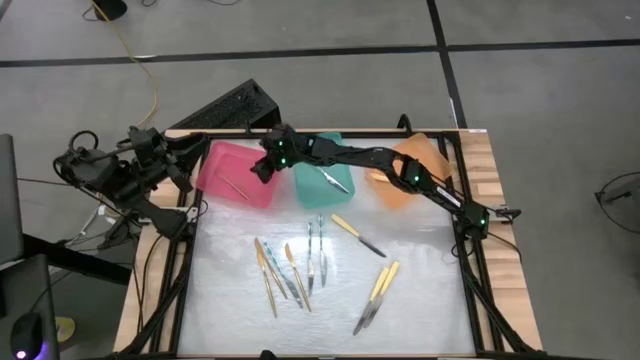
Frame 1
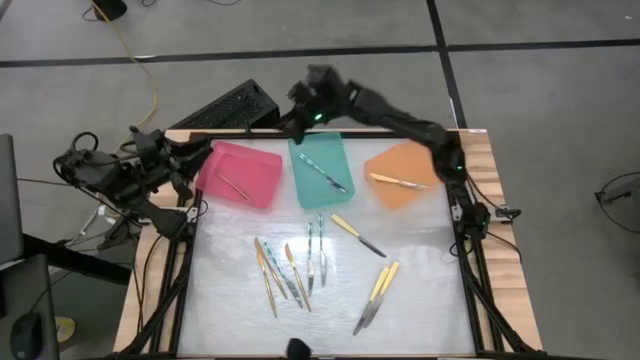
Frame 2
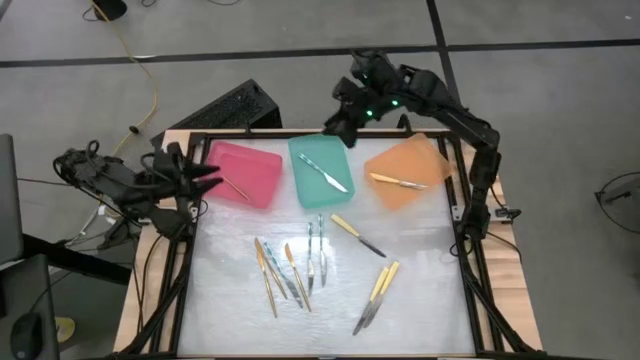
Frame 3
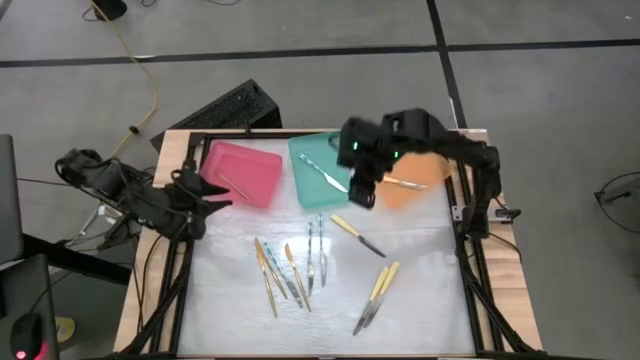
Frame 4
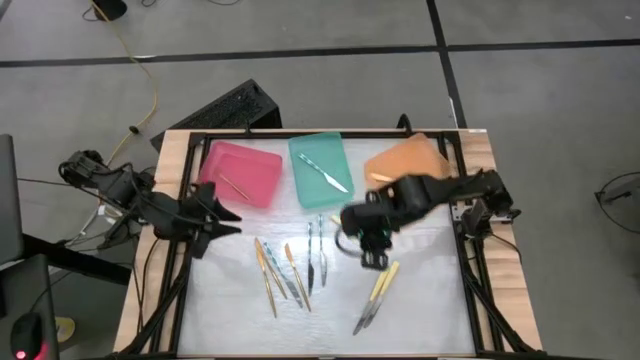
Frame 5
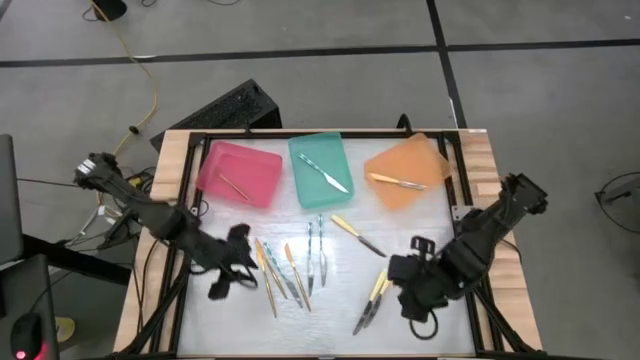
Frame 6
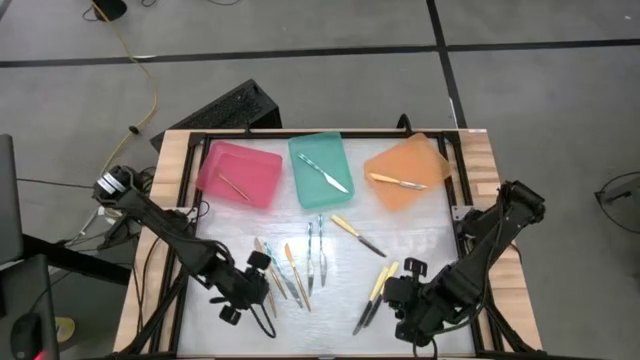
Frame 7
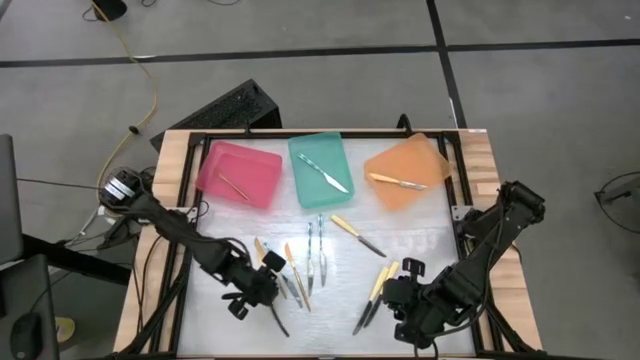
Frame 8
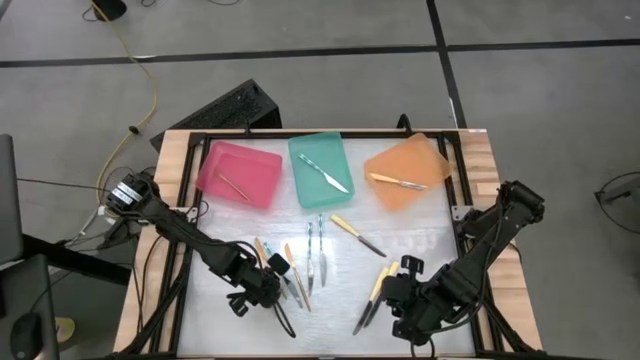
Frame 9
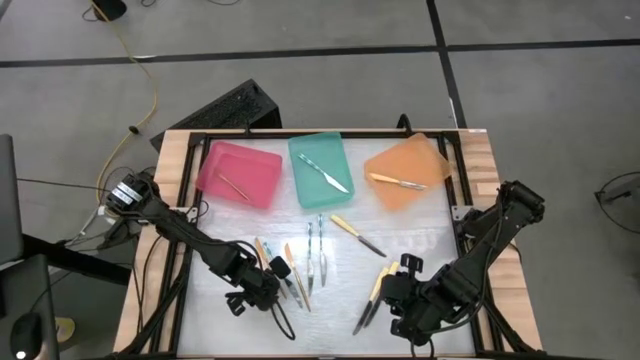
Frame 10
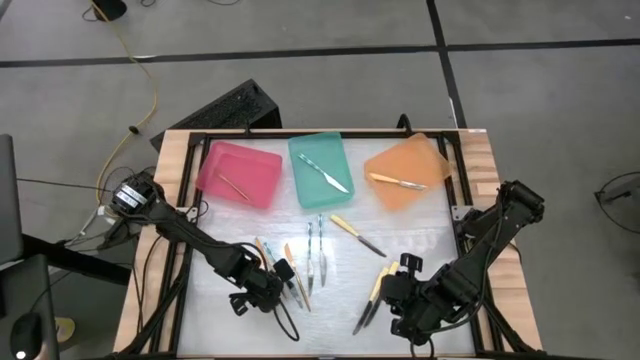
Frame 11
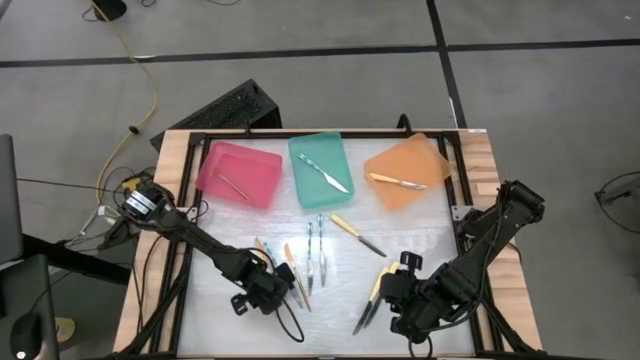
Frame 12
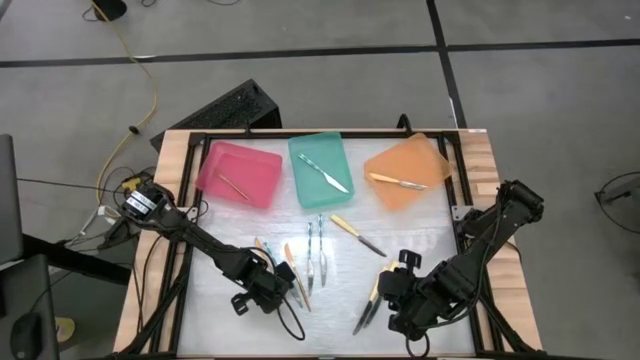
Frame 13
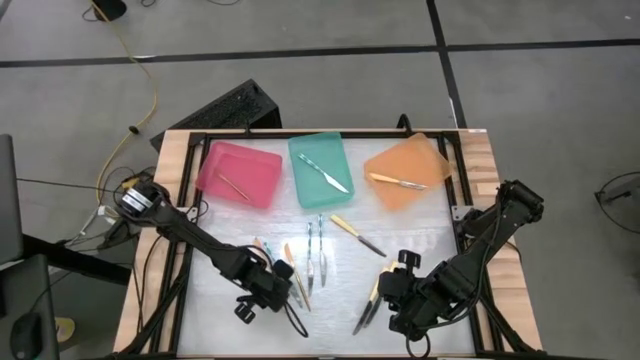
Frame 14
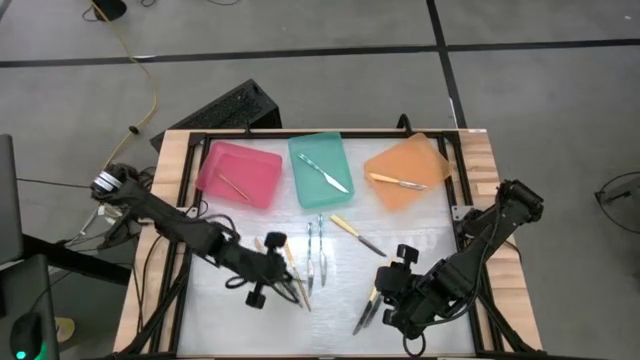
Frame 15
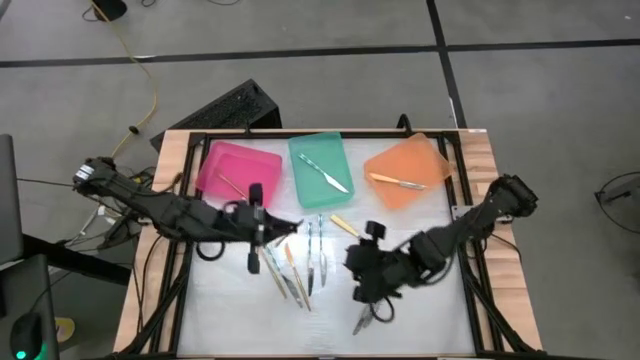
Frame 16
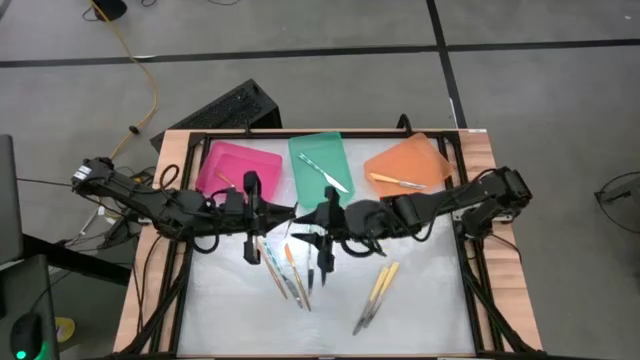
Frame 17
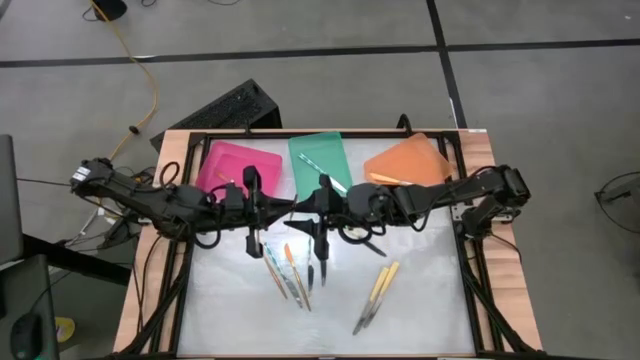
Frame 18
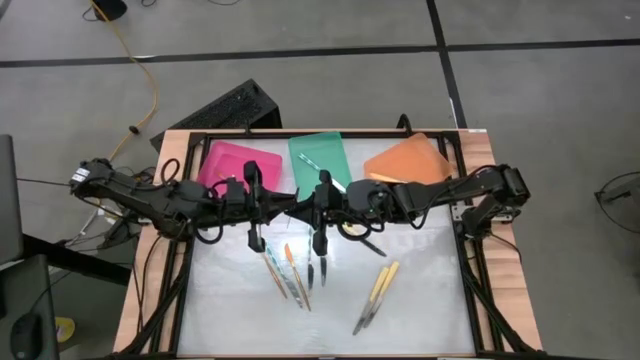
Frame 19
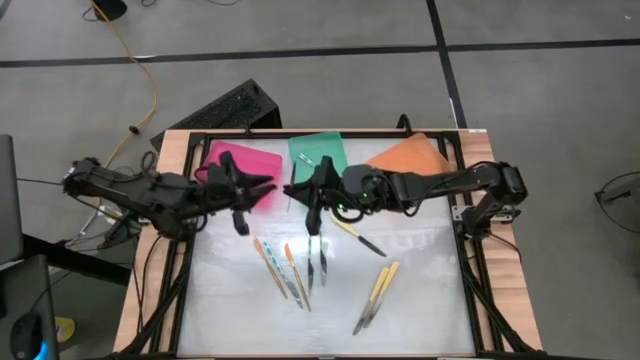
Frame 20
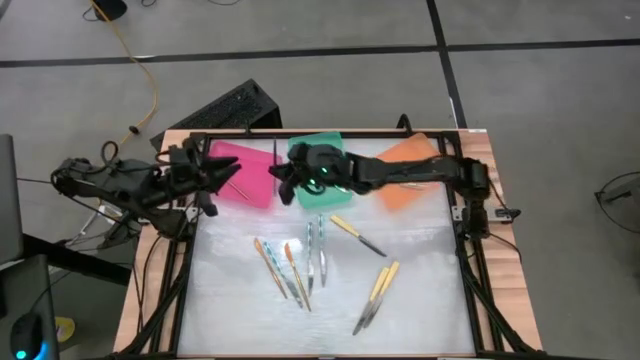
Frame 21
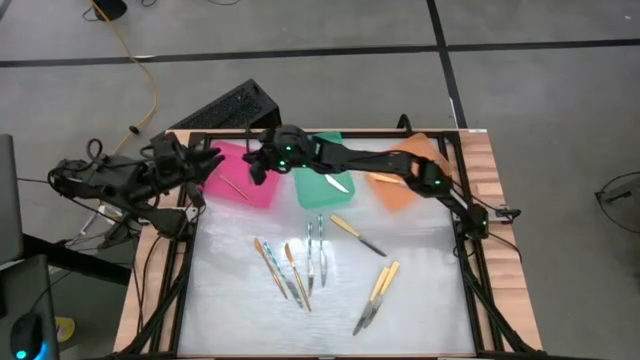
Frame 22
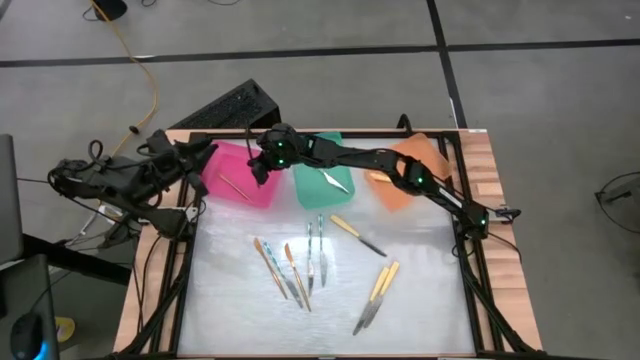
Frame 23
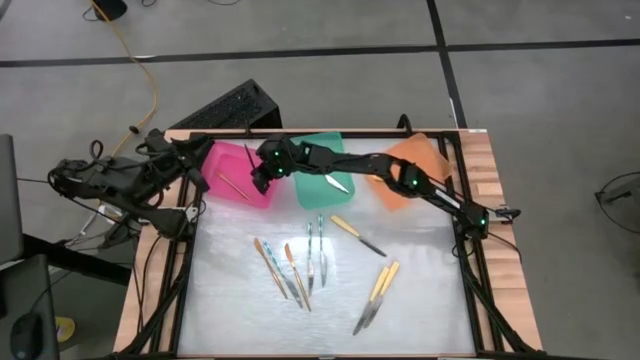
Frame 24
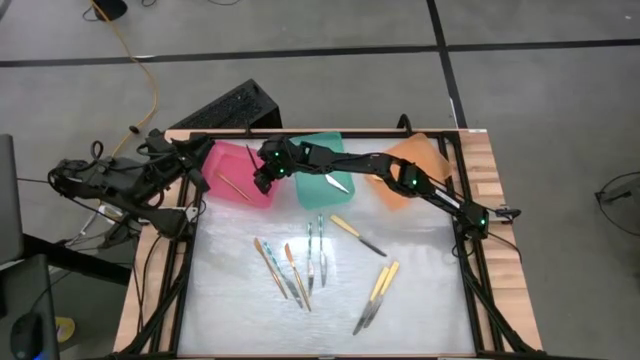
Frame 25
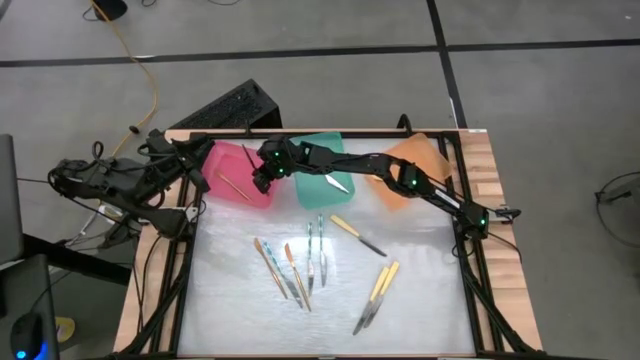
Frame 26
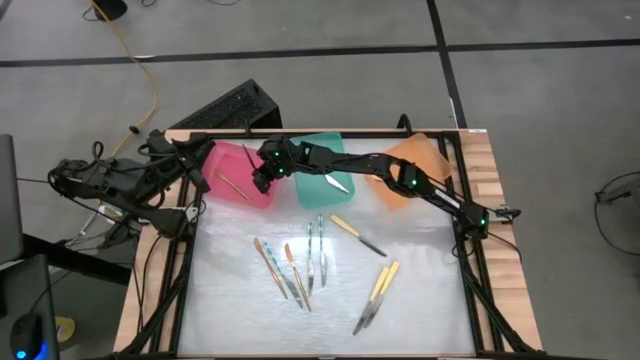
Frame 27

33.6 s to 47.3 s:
Task: Sort silverware by color (type)
Put the gold knife into the red bin

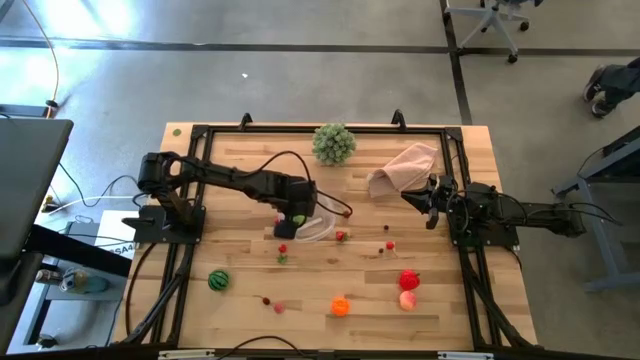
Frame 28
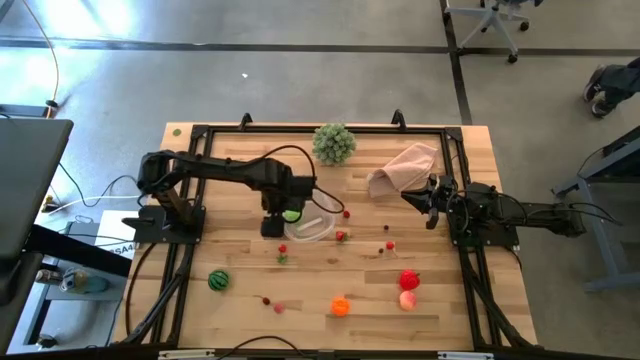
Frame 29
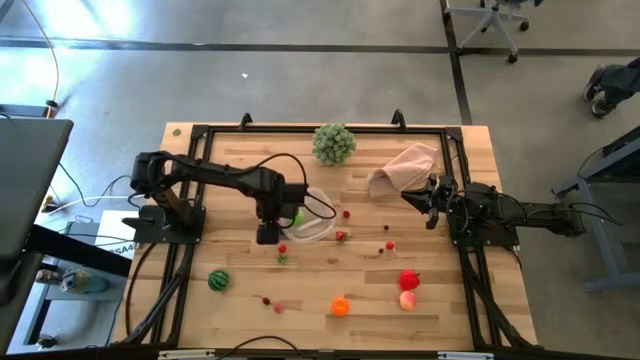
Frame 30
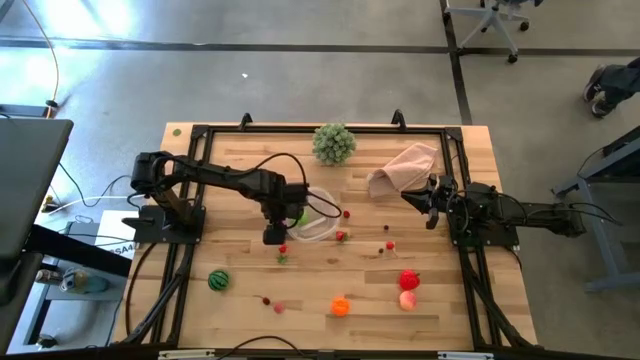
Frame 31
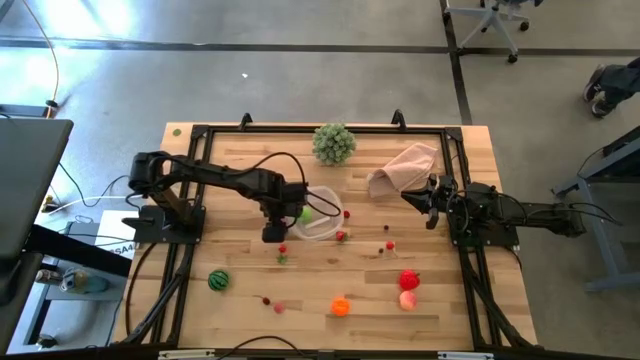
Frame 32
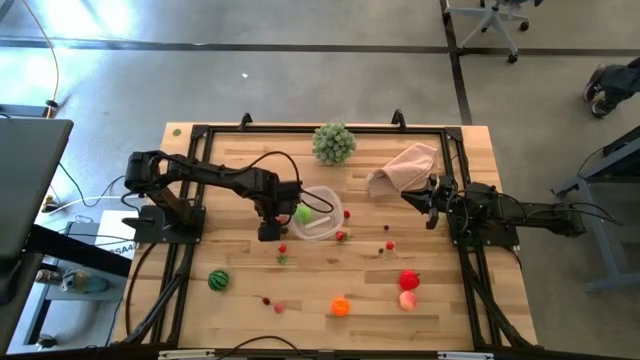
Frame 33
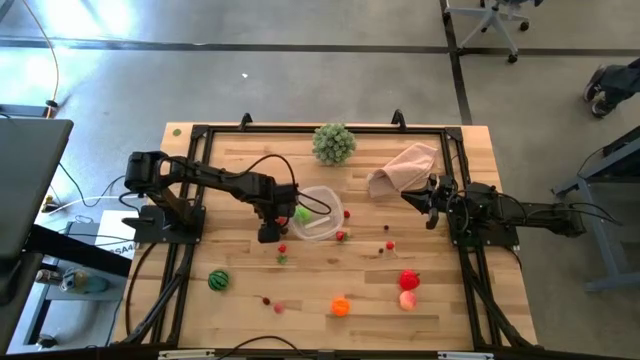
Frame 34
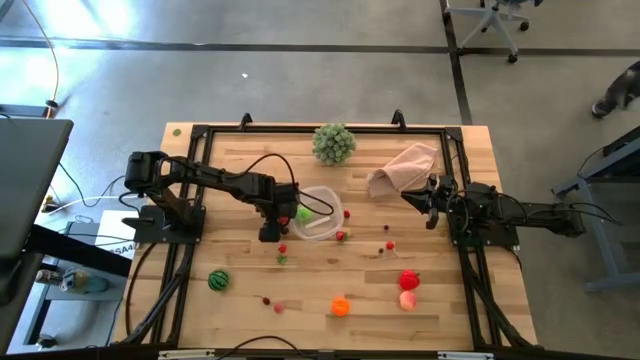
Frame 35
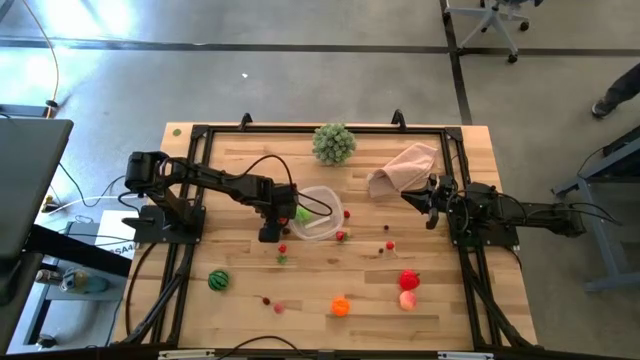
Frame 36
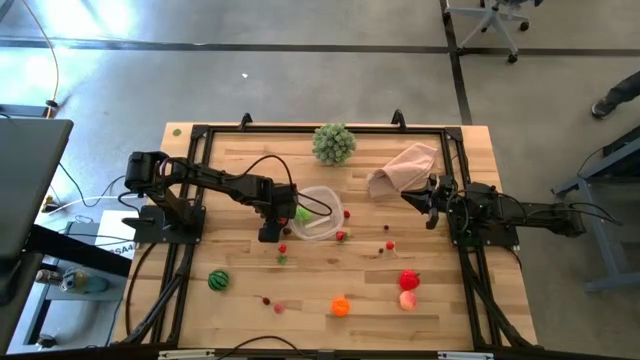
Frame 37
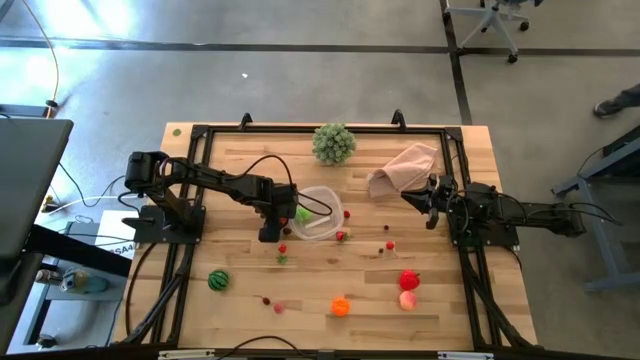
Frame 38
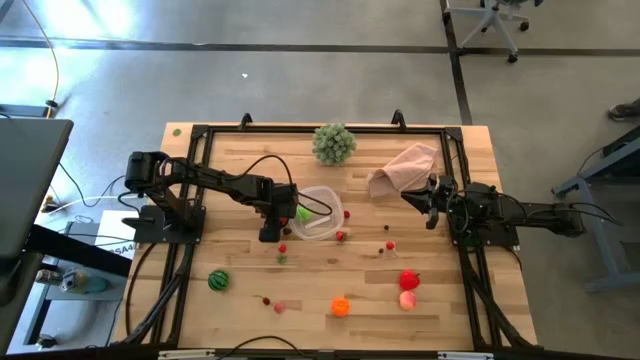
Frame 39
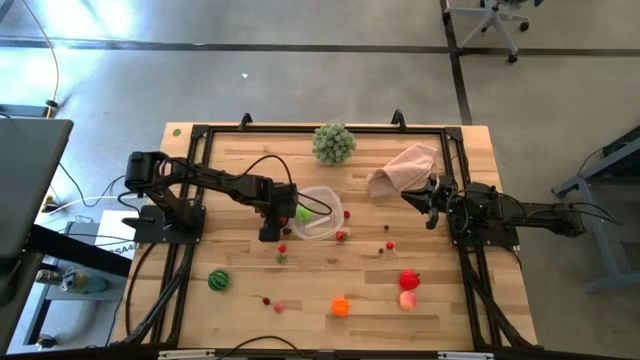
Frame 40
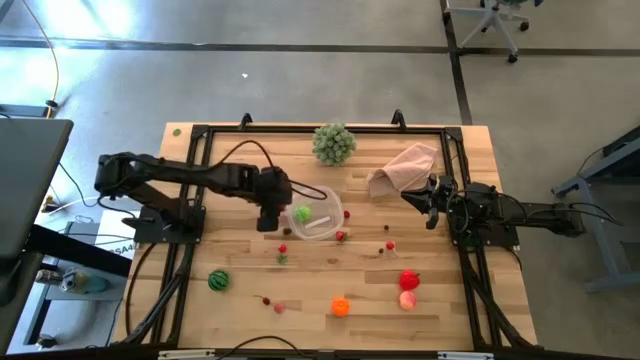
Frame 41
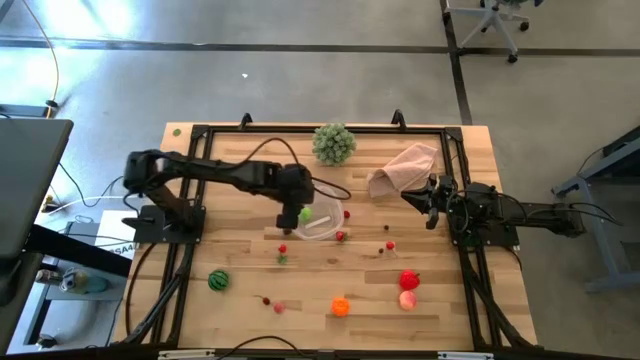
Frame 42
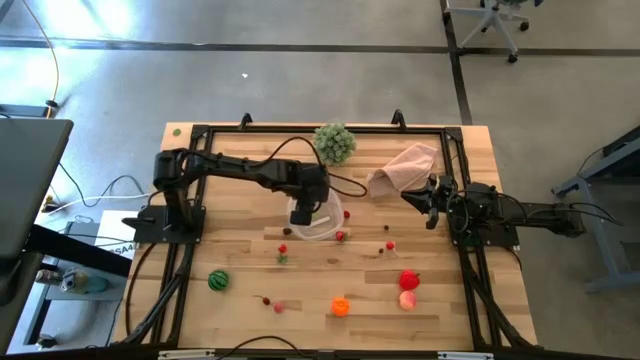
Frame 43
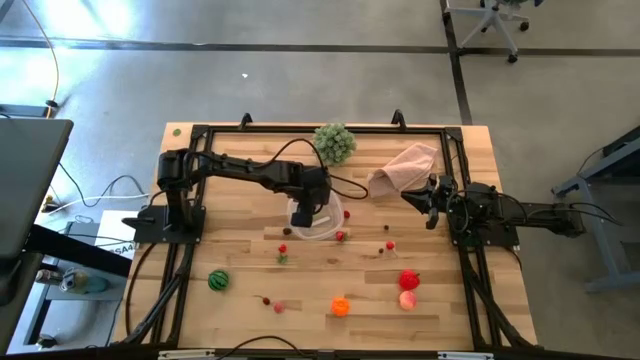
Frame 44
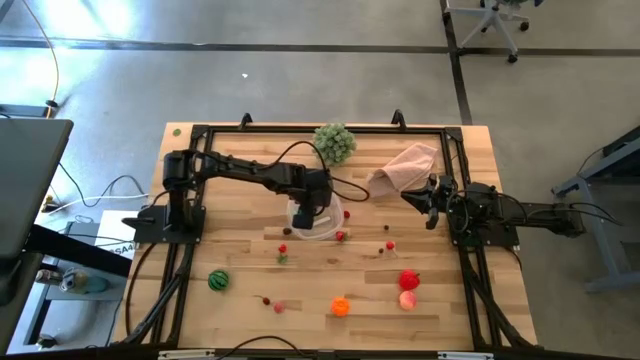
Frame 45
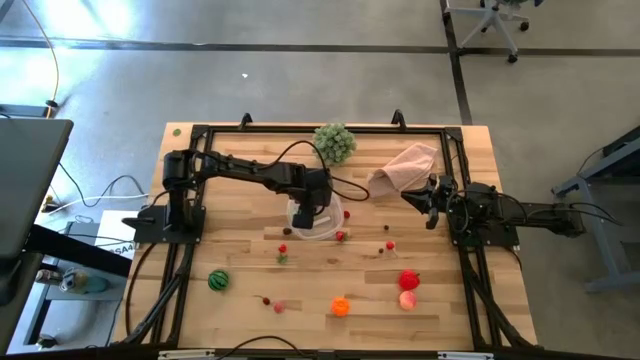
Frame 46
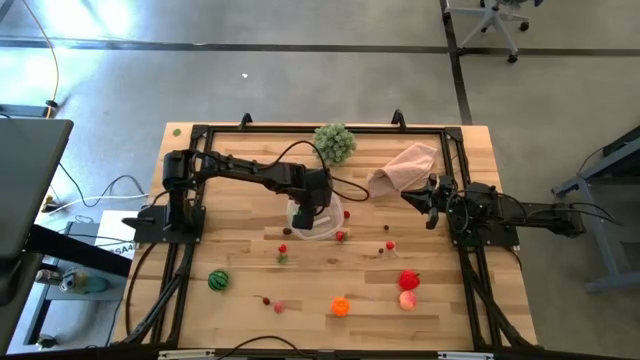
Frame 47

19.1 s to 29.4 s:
Task: Pick and placing Produce into tupperware
Put the red strawberry into the transparent bin
